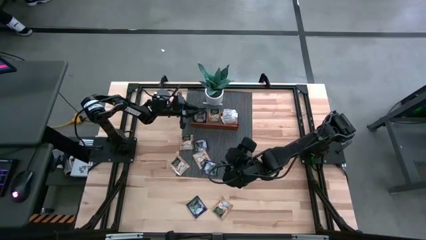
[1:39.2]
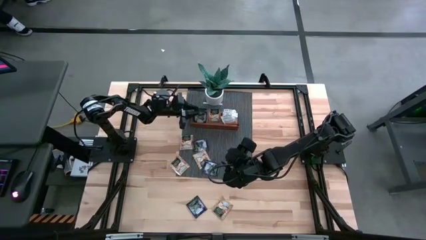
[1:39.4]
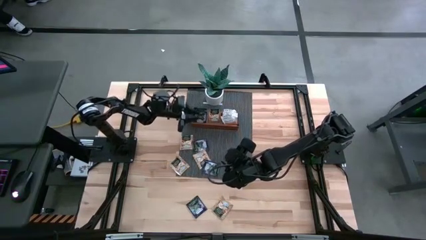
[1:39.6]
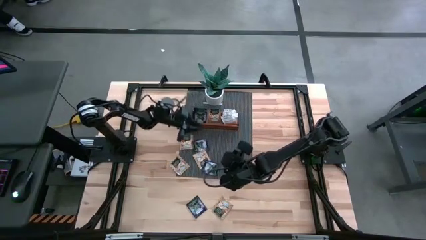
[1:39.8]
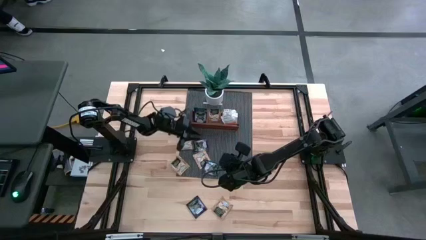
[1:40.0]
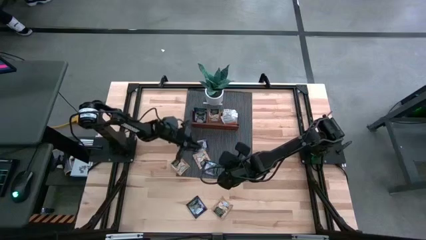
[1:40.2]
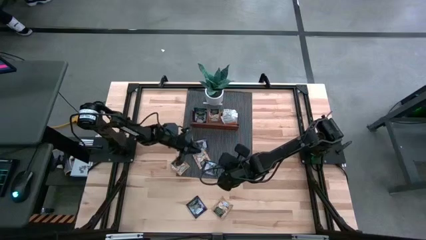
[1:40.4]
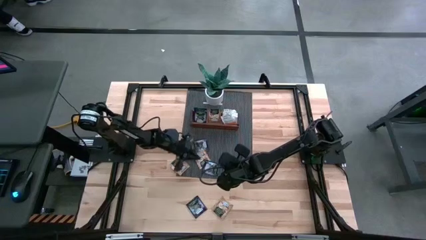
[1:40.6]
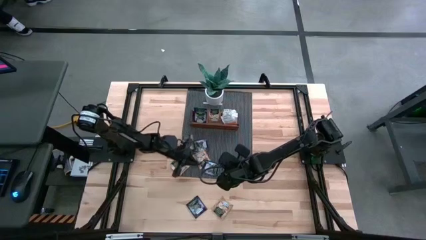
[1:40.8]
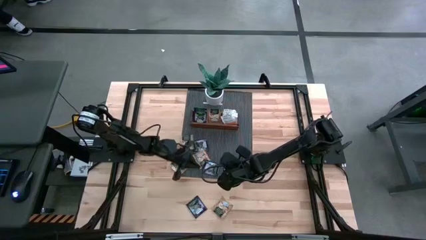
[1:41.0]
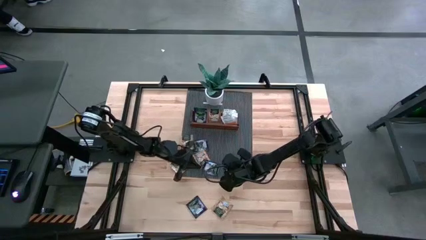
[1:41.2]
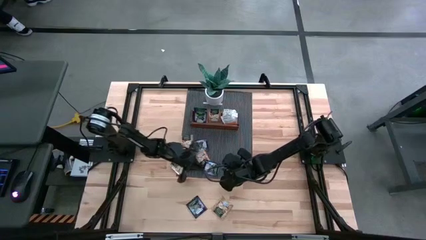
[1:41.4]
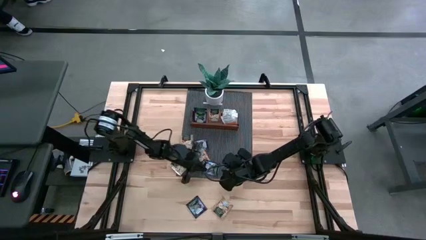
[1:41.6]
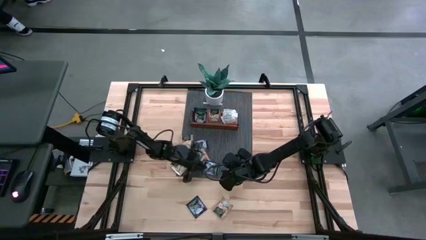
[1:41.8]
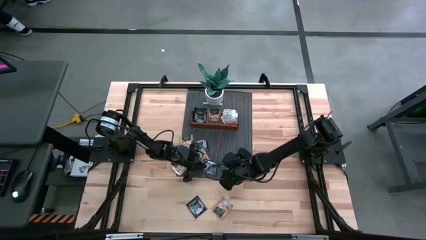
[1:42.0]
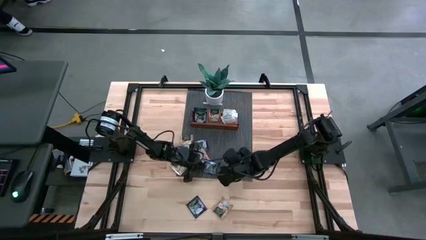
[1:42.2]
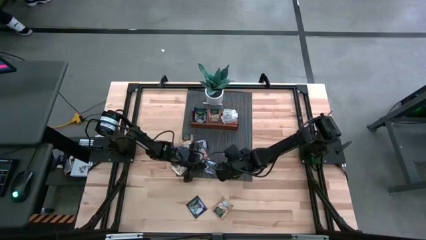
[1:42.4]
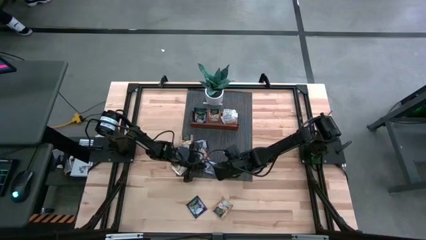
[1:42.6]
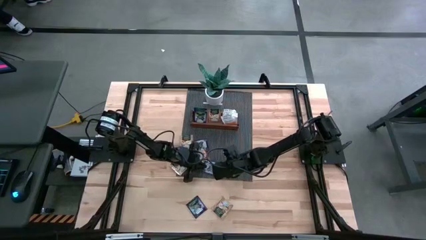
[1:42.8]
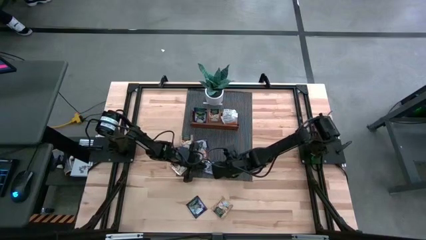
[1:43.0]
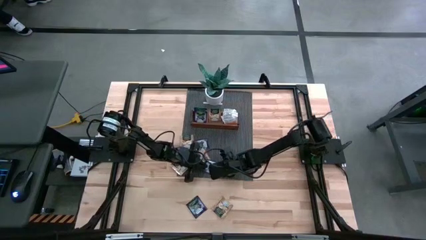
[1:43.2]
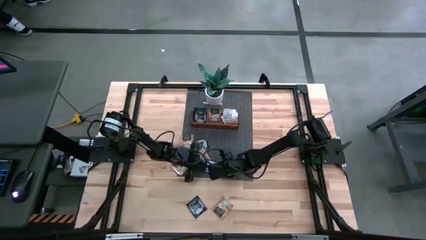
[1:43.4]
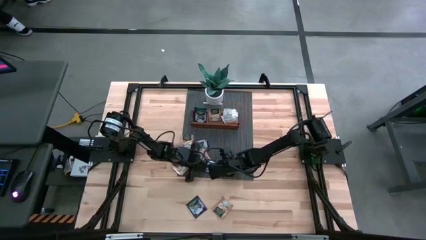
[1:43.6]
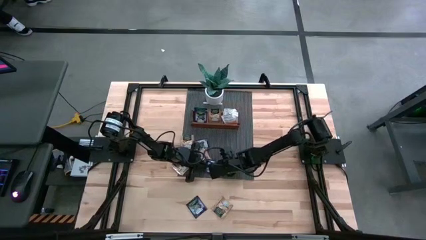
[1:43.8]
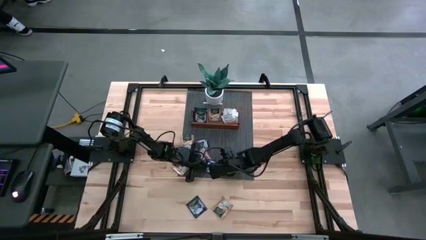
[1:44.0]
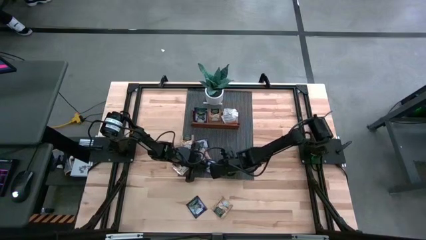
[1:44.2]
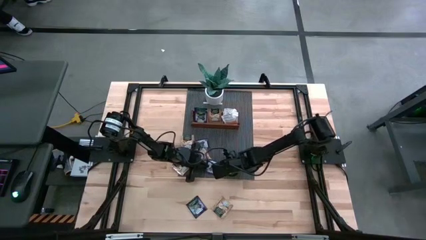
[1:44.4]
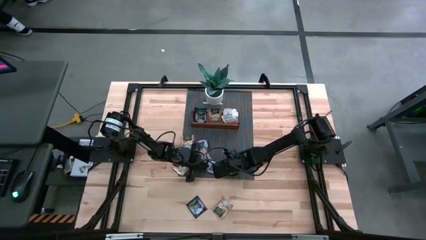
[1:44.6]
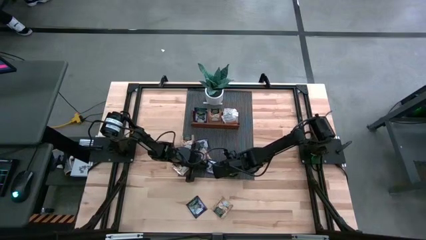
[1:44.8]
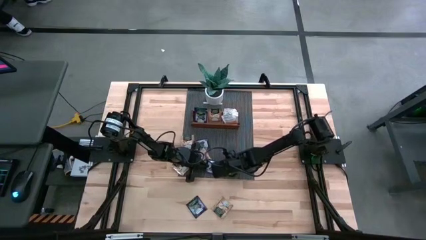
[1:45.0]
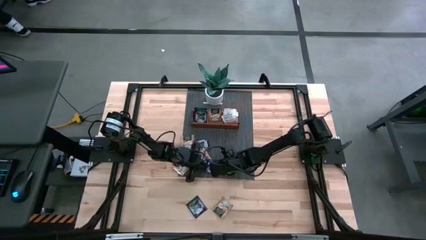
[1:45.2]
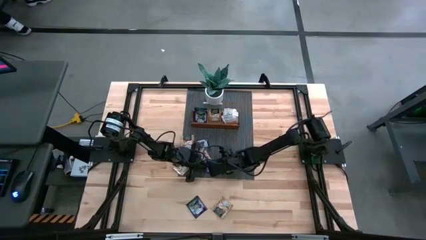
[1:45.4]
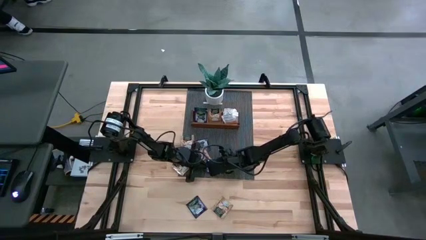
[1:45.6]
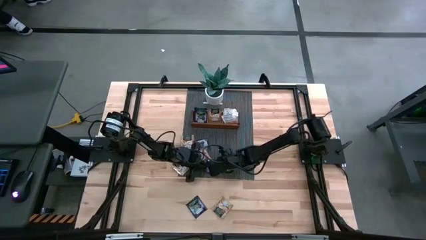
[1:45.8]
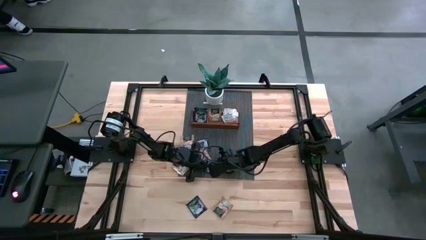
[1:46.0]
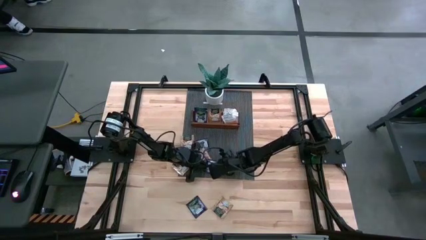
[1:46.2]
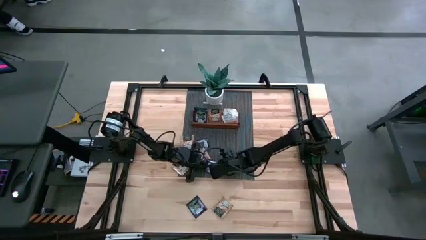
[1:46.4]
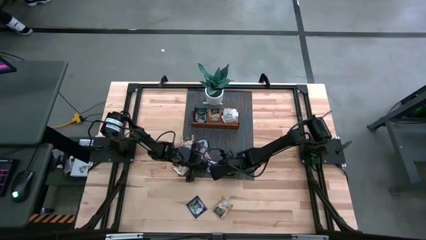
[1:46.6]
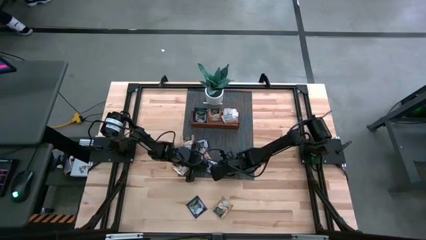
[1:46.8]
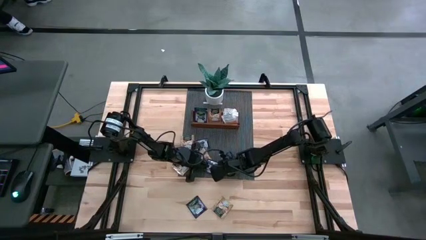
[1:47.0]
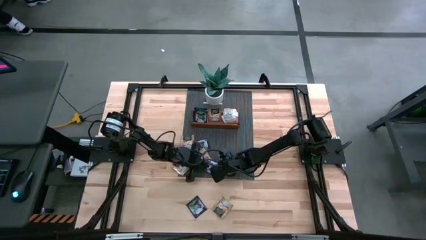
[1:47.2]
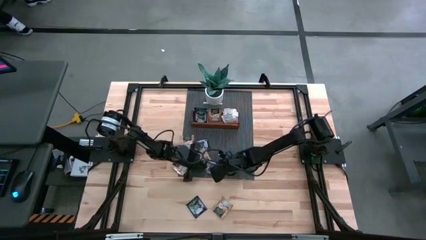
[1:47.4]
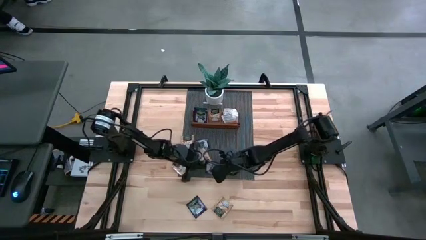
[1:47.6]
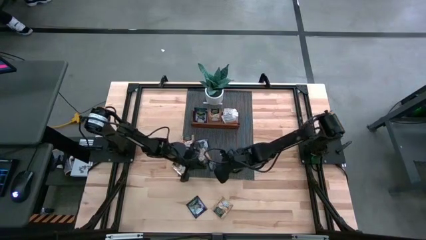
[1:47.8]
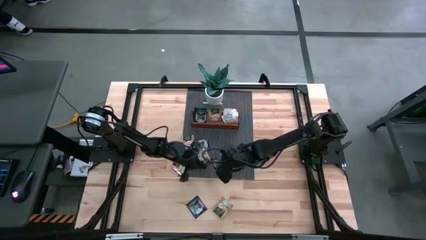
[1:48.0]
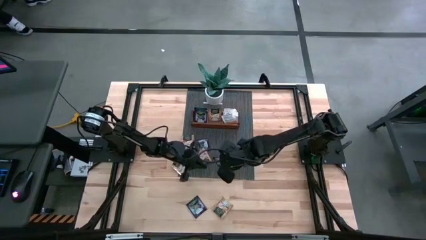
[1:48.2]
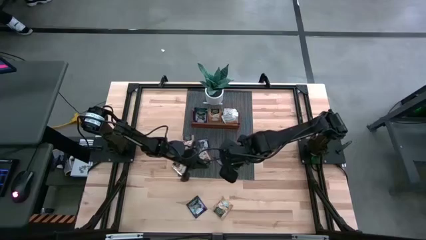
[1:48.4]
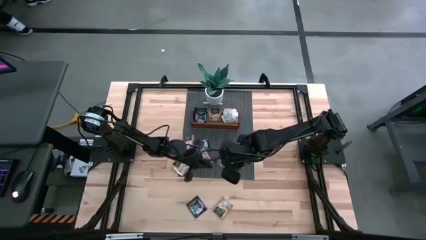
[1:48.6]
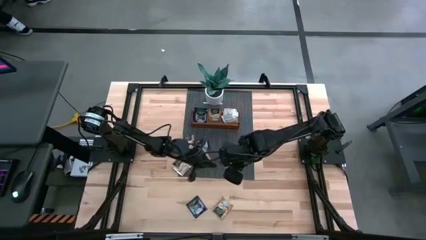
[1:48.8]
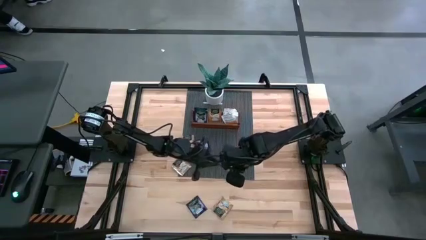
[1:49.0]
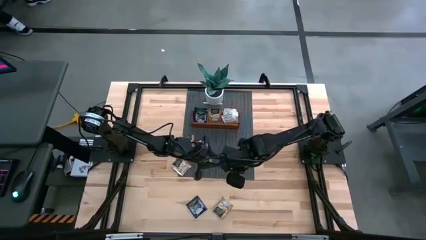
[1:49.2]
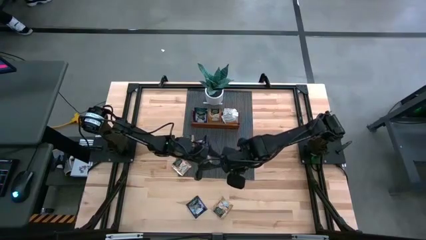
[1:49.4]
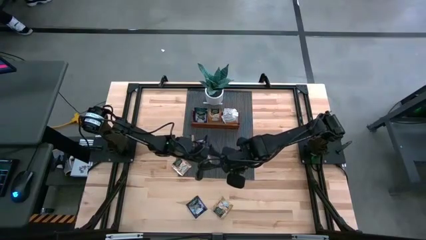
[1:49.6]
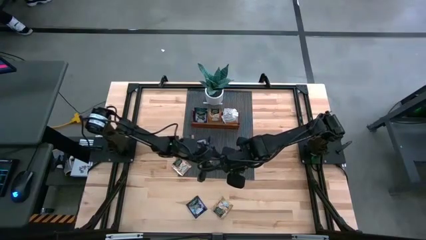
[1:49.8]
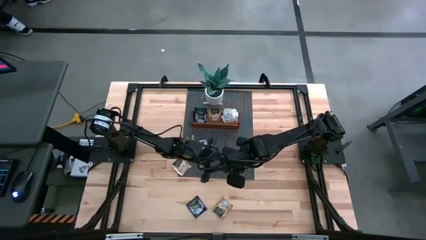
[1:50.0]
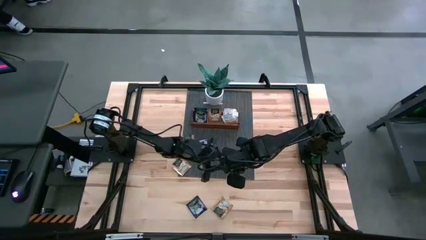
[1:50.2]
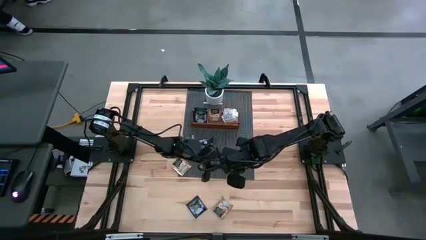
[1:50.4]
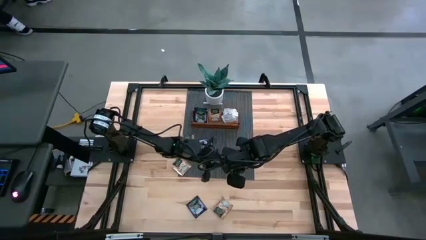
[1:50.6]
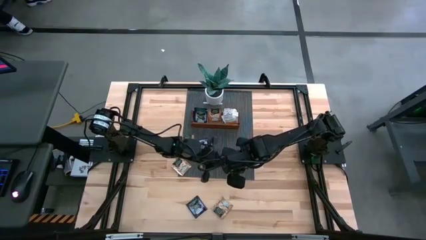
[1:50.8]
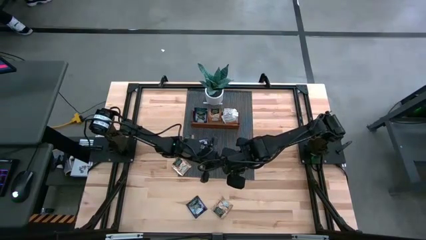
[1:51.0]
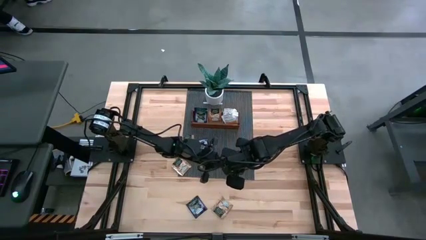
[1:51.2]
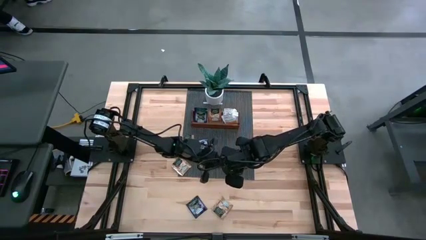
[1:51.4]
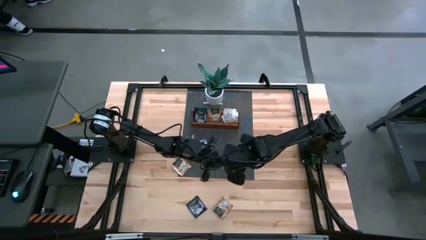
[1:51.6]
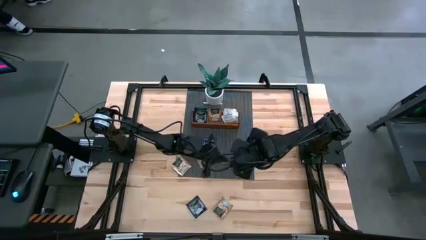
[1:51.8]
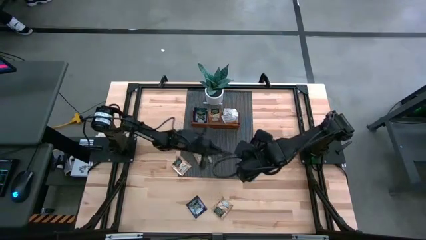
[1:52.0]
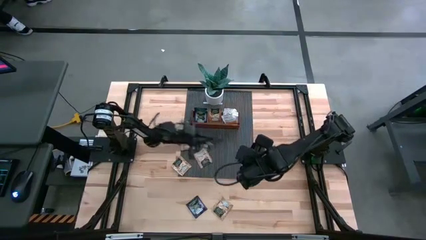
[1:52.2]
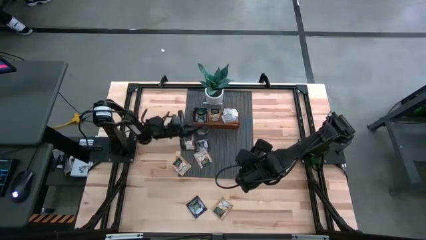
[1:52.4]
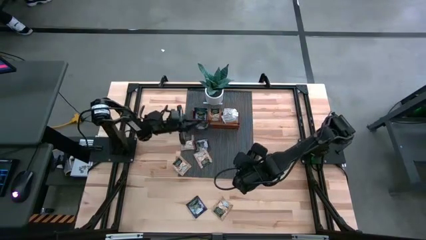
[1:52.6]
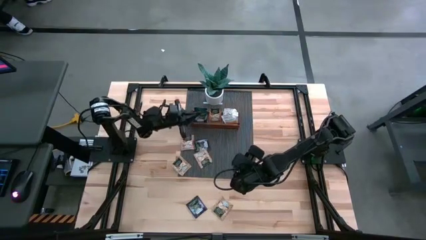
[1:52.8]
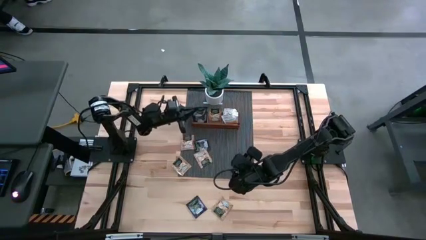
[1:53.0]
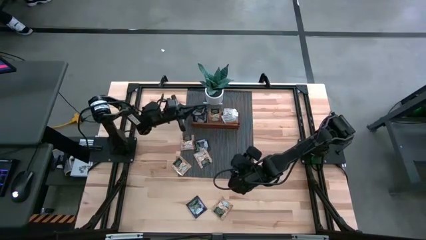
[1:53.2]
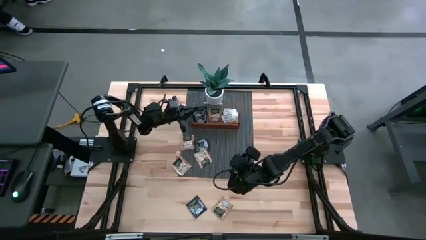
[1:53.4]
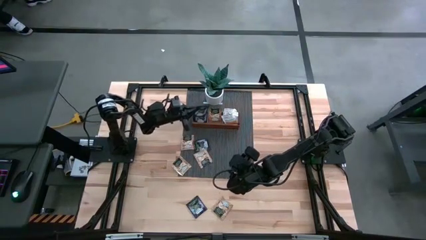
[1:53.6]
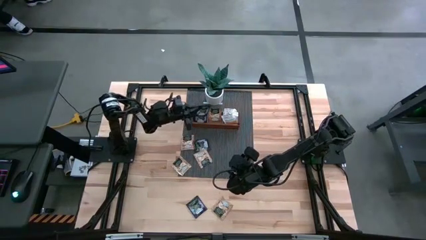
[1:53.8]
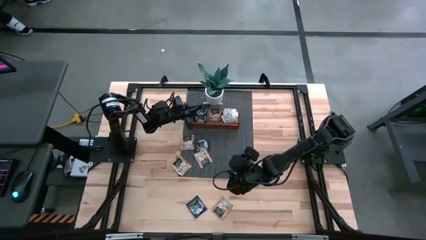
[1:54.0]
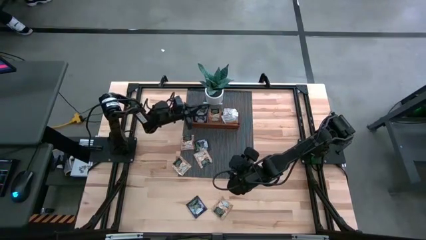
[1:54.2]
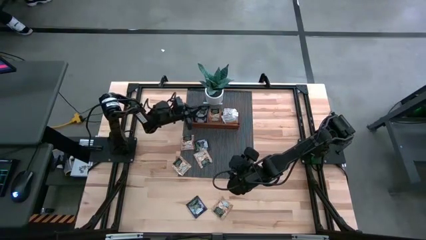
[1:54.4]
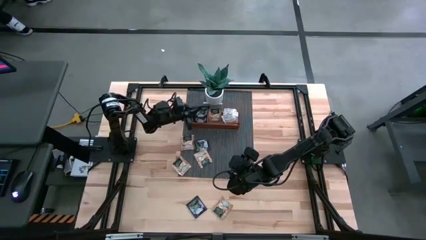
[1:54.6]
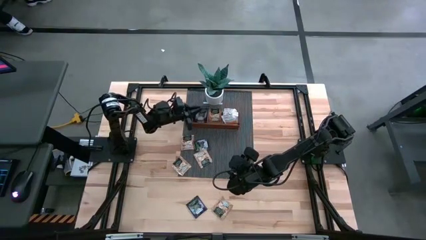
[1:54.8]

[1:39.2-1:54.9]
Task: Pick & Place Tea
Put the purple tea bag into the left section of the wooden organizer
